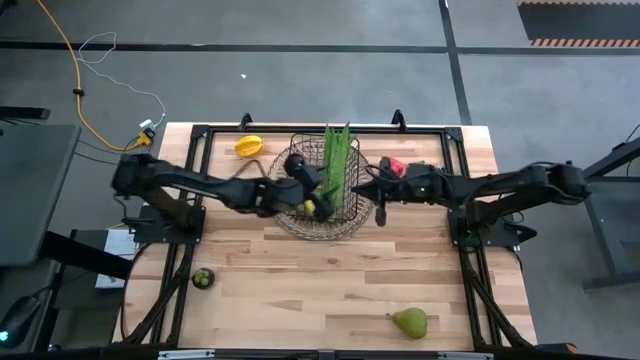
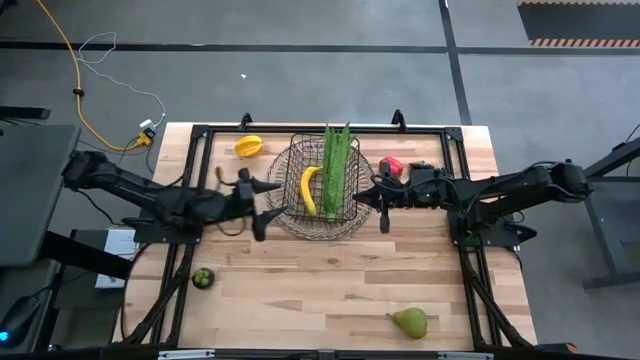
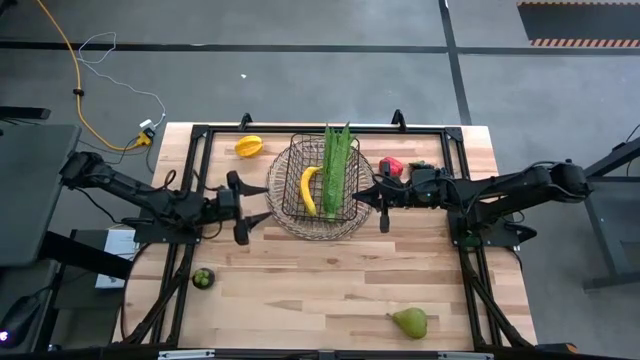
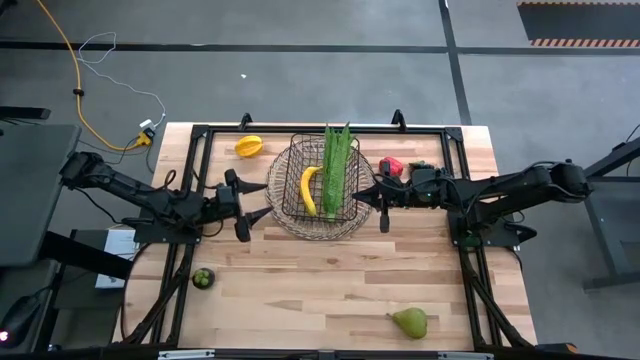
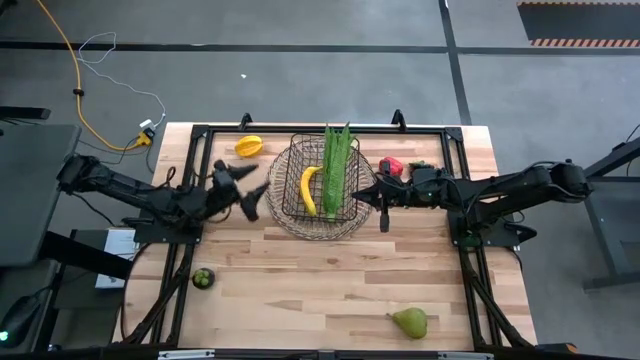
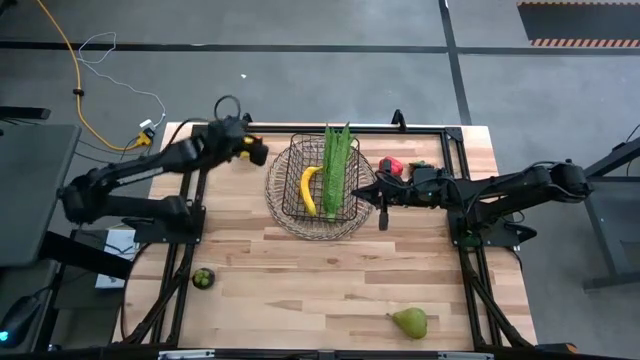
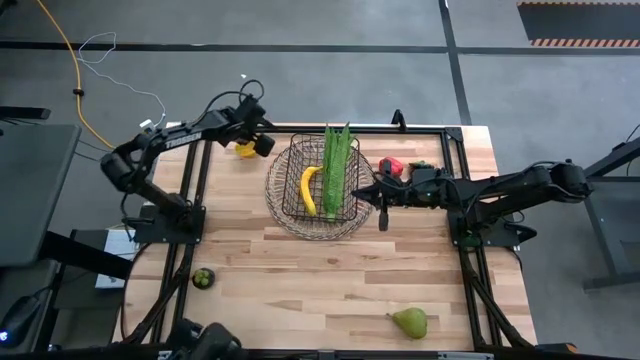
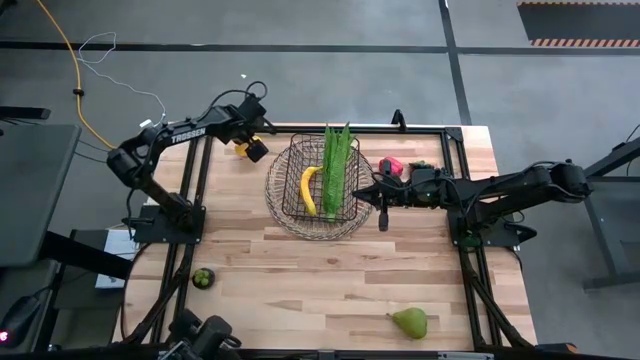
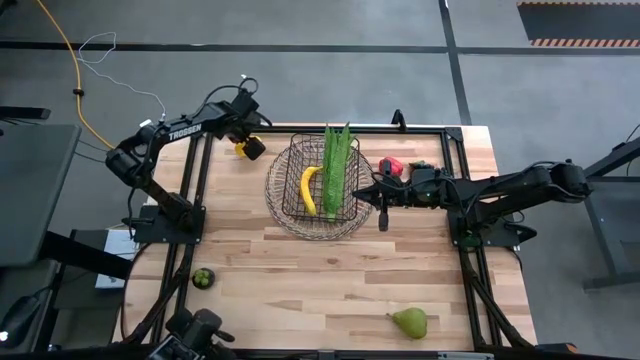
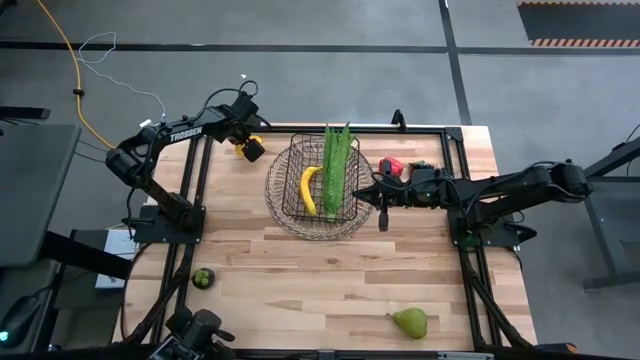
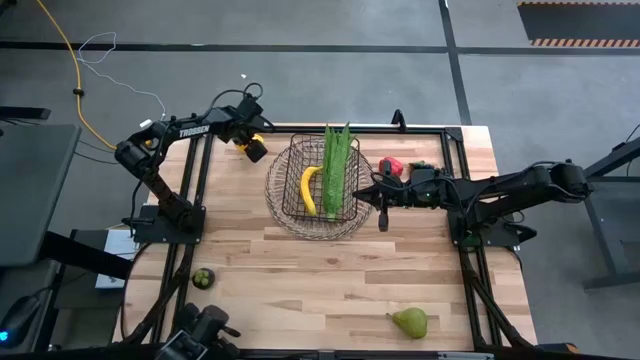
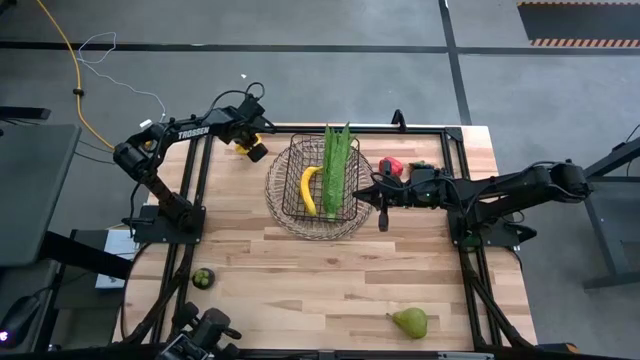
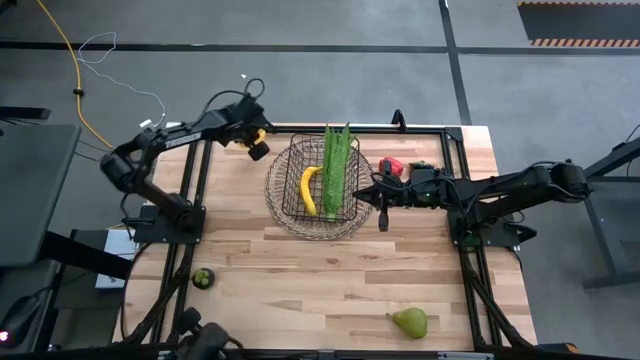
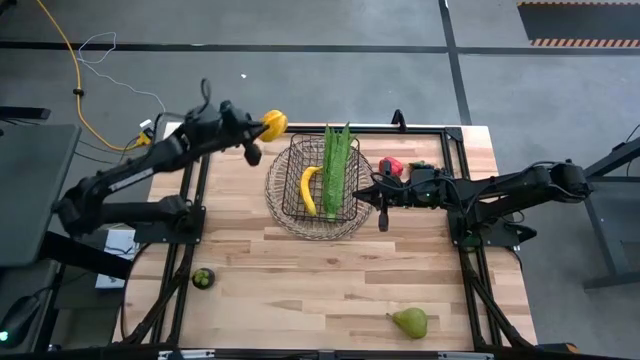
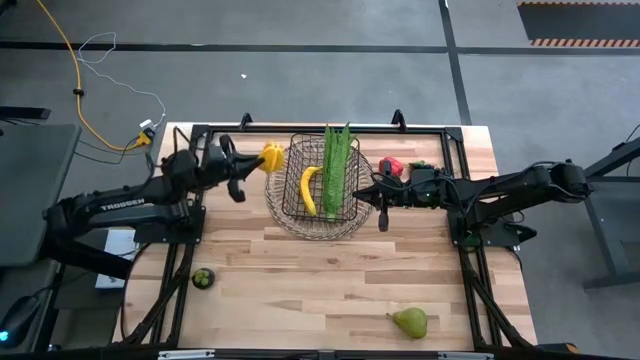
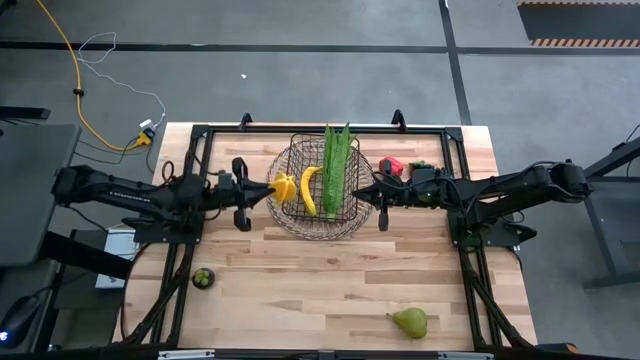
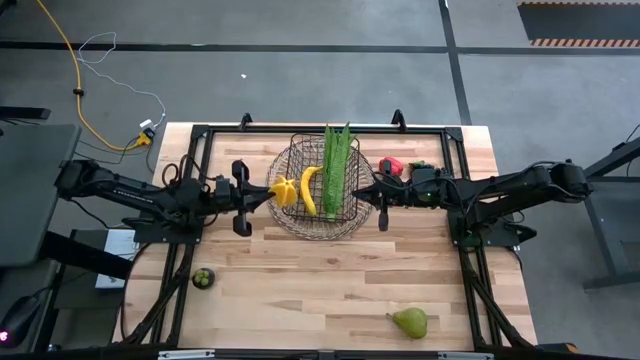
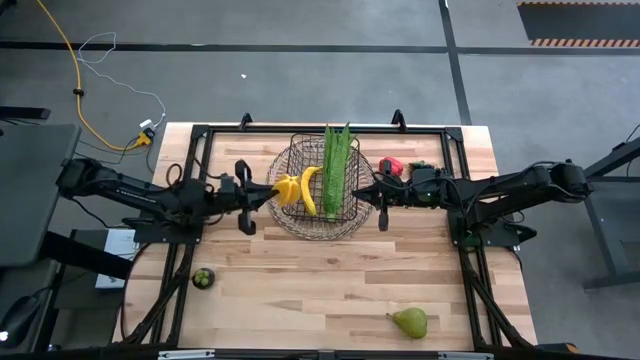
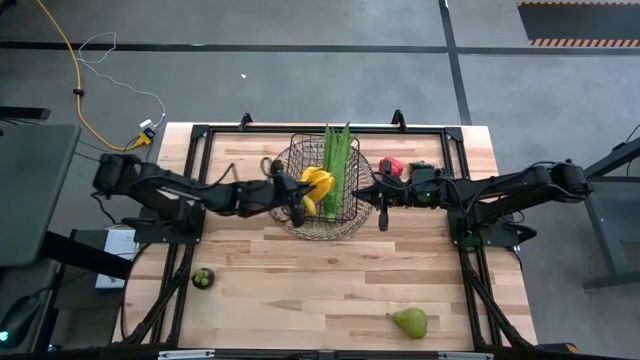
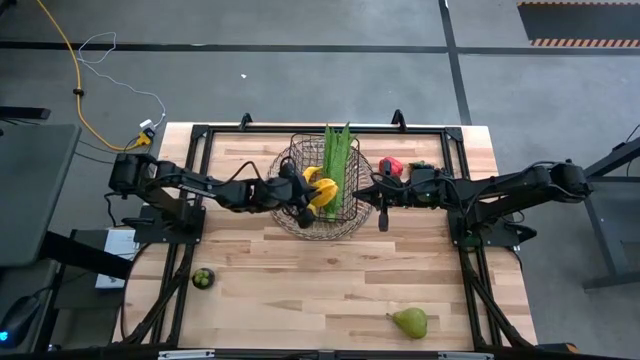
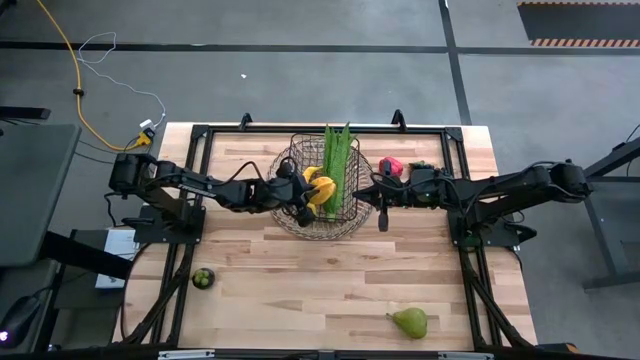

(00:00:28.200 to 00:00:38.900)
Task: Build produce basket
Put the yellow starfruit into the black wire basket

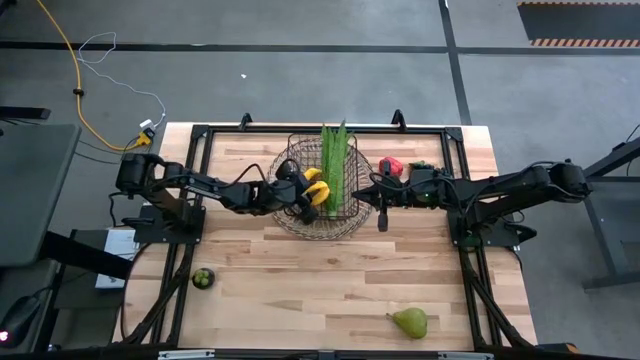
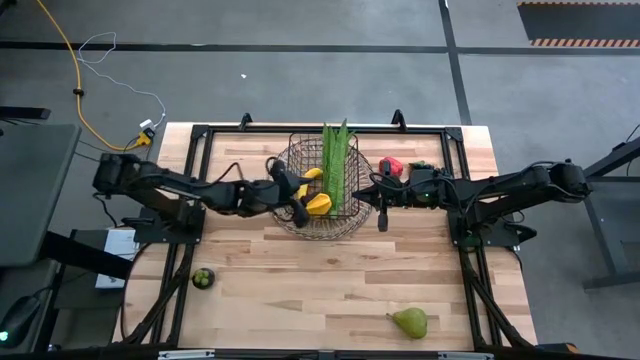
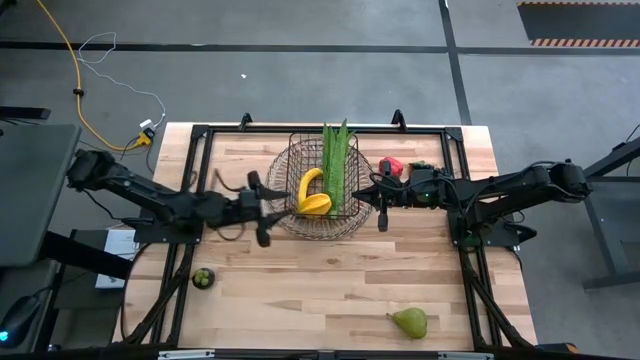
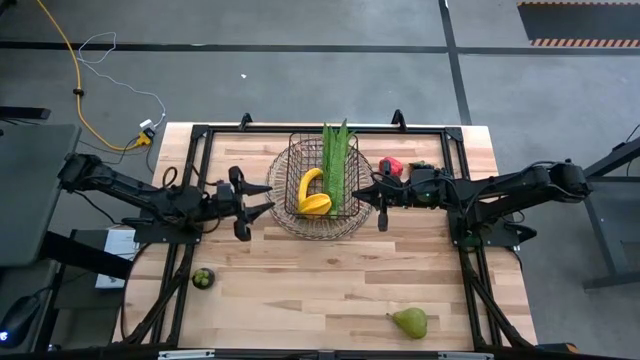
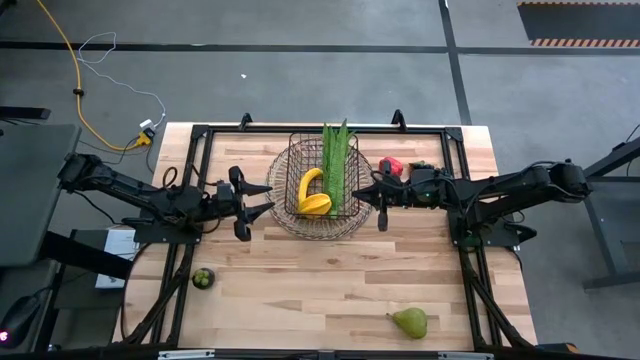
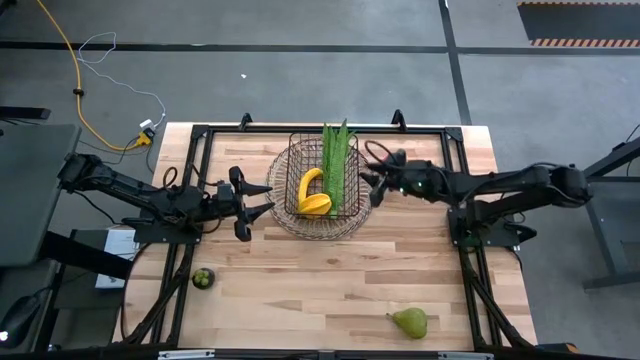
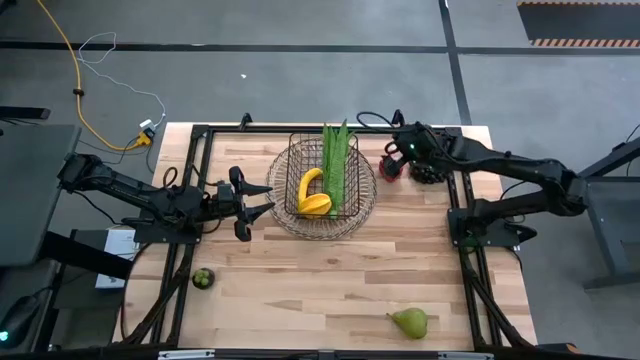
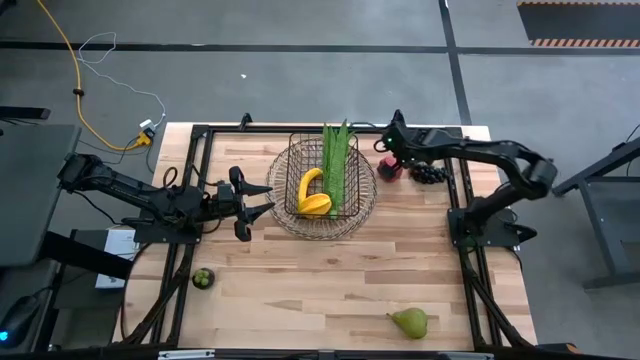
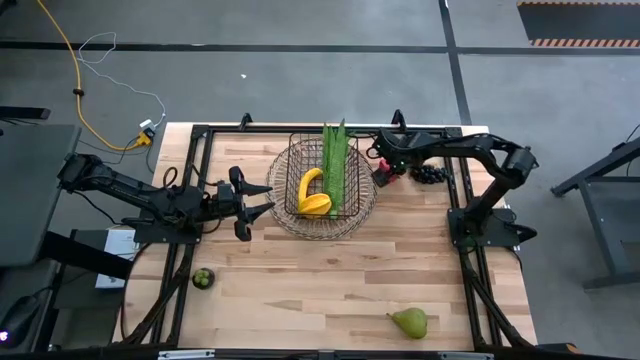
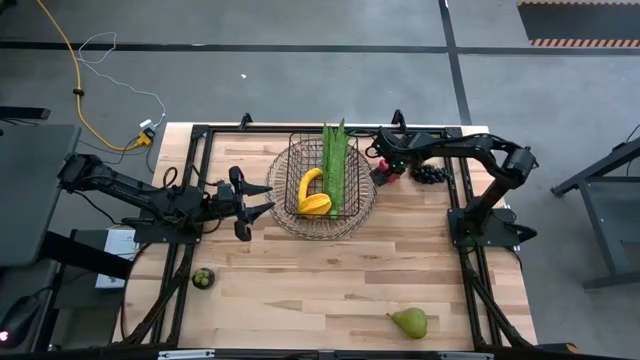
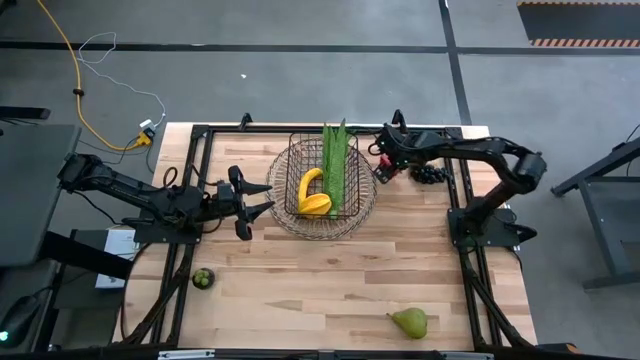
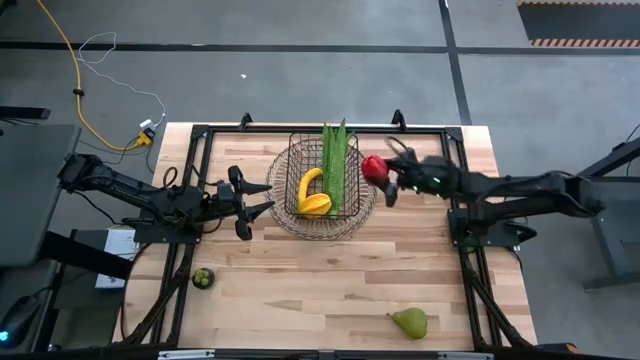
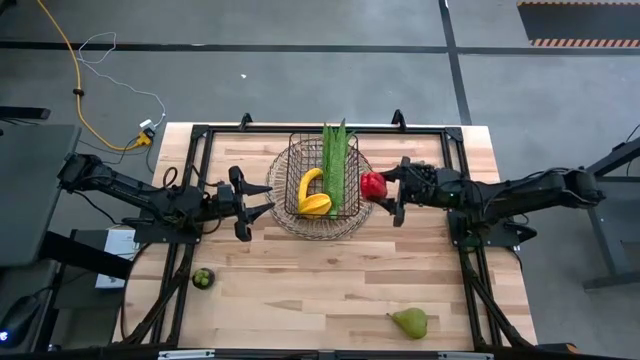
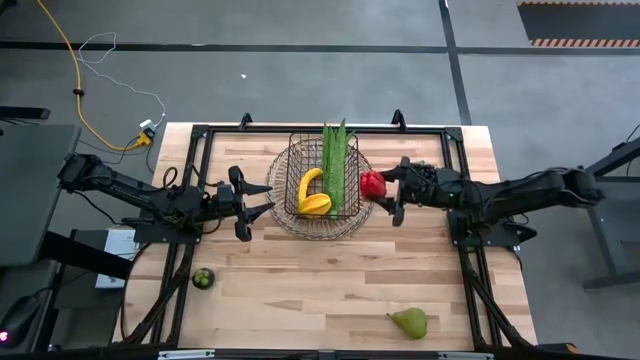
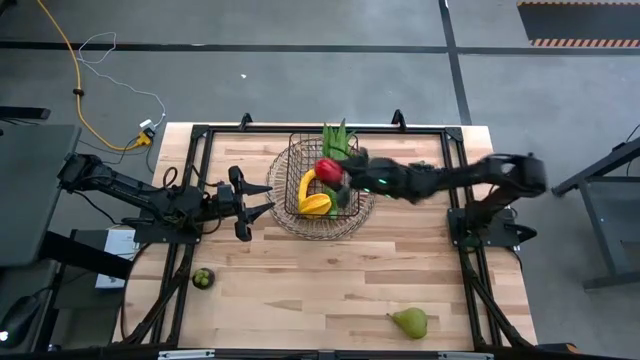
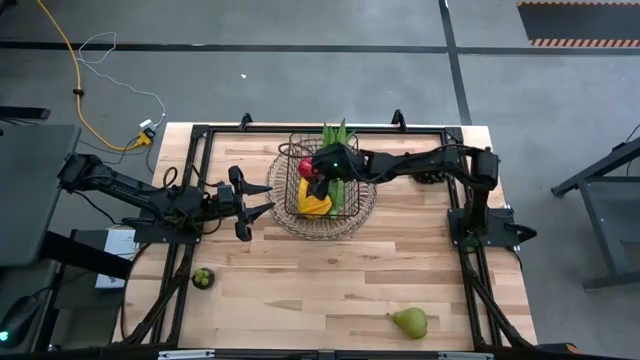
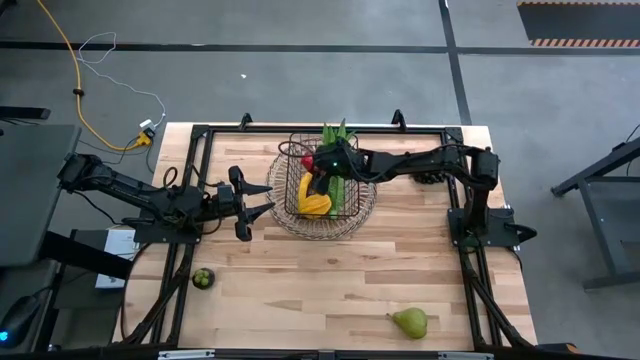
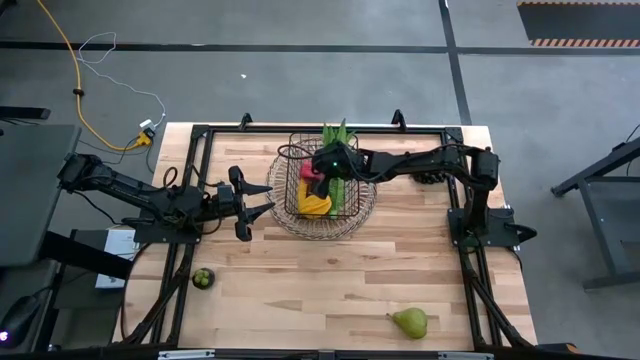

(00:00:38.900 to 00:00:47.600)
Put the red bell pepper into the black wire basket

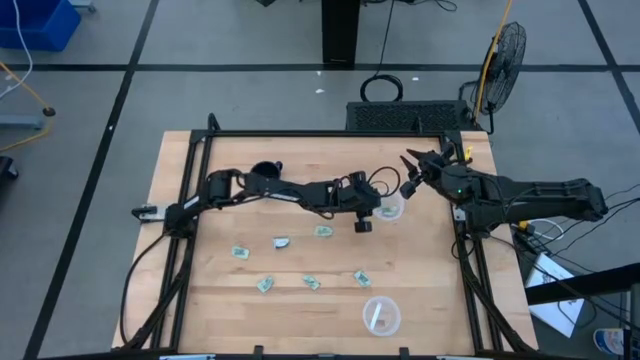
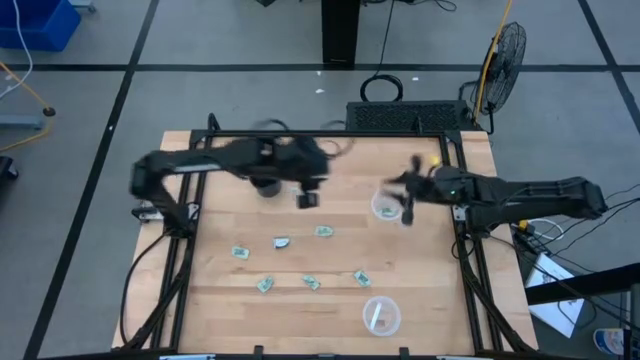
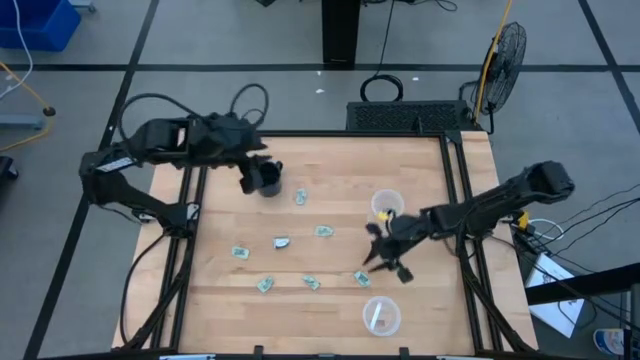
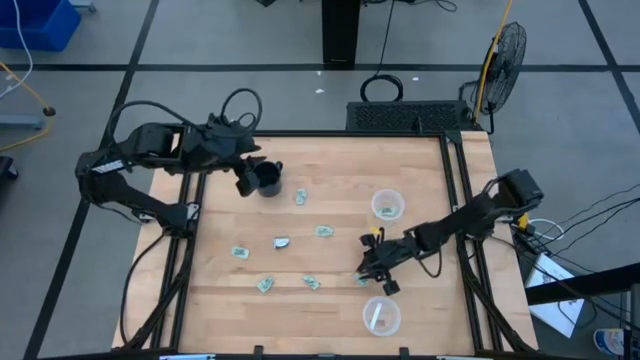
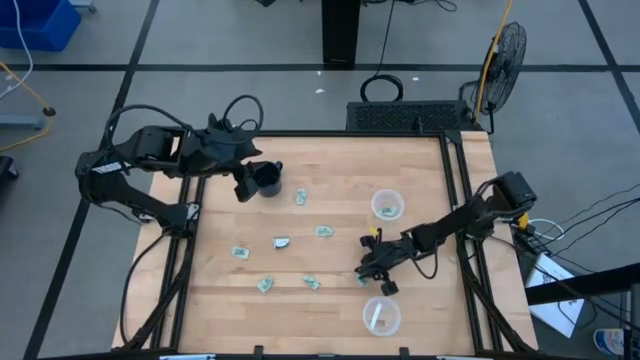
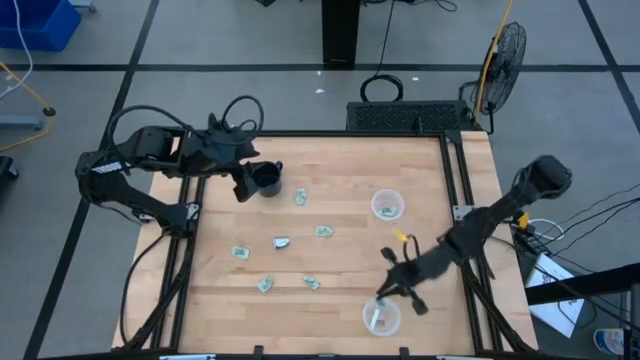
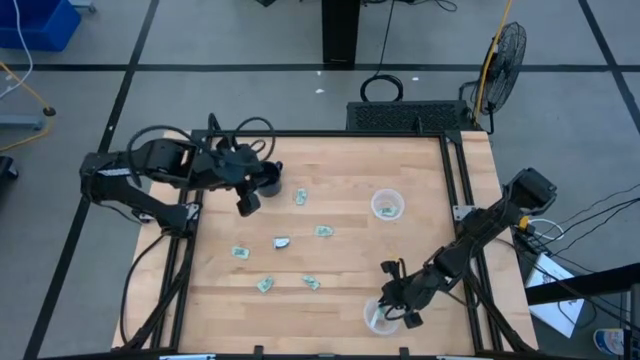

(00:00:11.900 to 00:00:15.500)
Task: Pick and place Stevia / Truvia into bins
Put the light green stevia packet into the bottom transparent container
